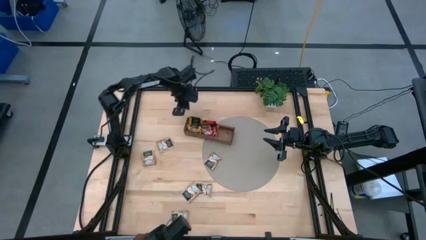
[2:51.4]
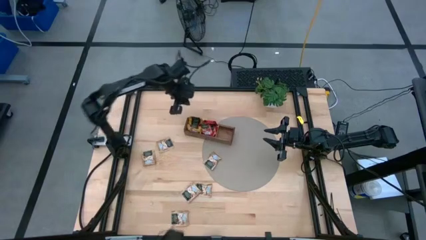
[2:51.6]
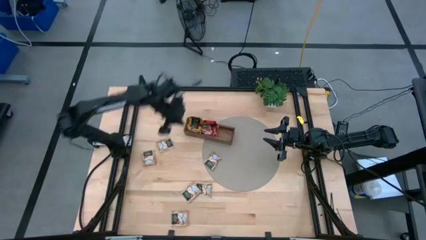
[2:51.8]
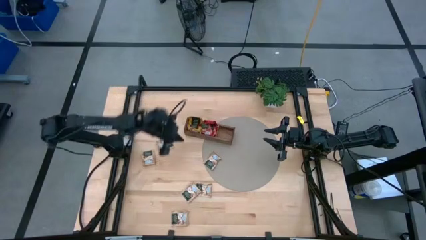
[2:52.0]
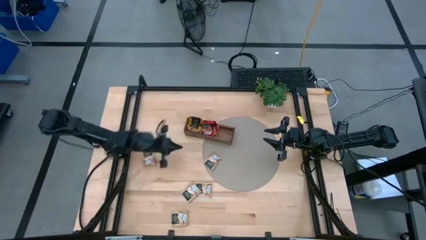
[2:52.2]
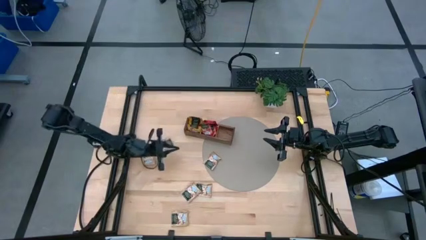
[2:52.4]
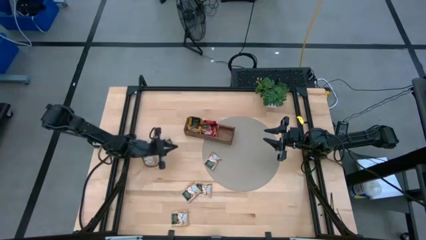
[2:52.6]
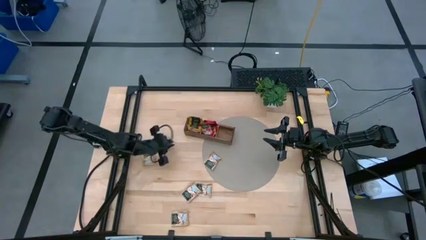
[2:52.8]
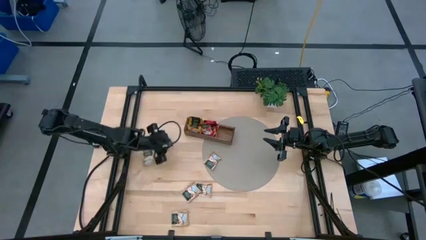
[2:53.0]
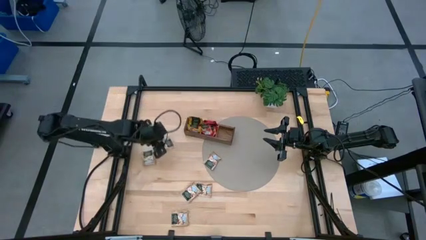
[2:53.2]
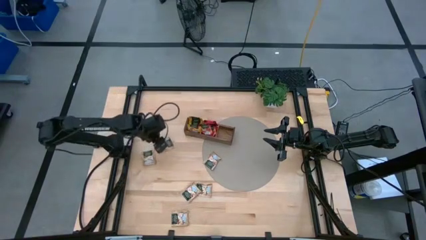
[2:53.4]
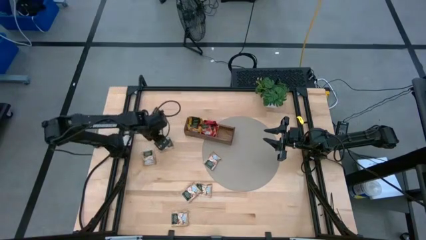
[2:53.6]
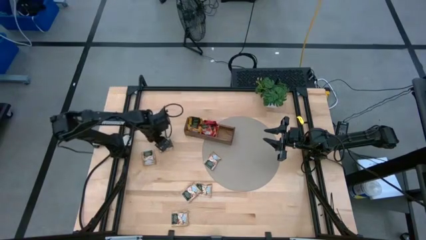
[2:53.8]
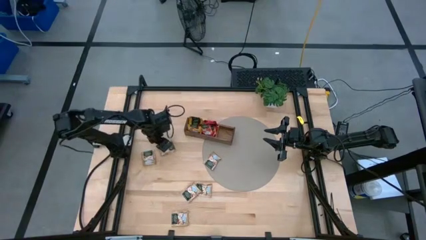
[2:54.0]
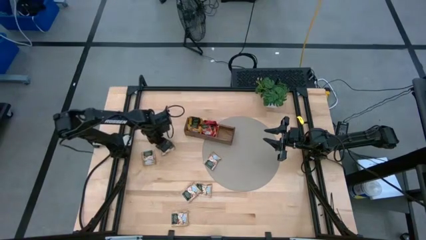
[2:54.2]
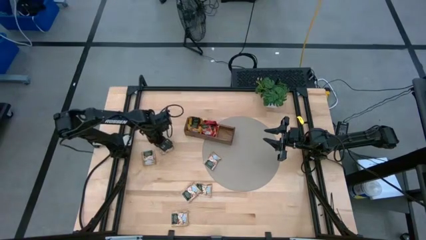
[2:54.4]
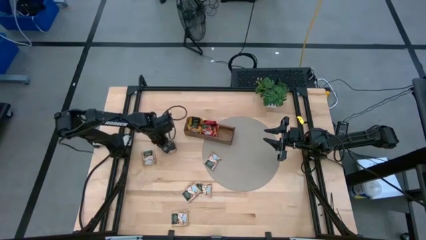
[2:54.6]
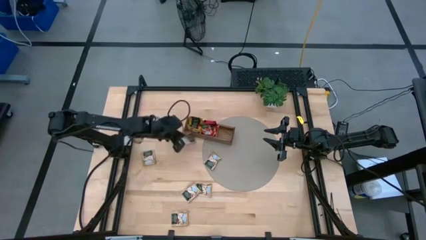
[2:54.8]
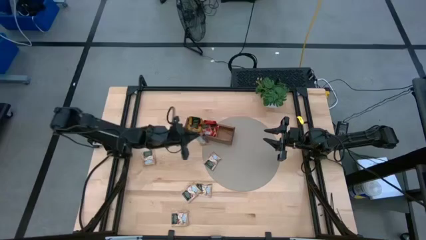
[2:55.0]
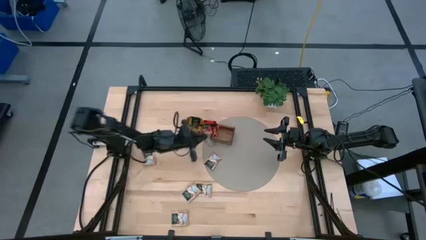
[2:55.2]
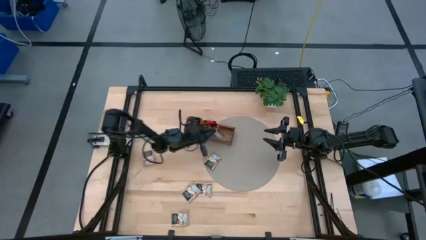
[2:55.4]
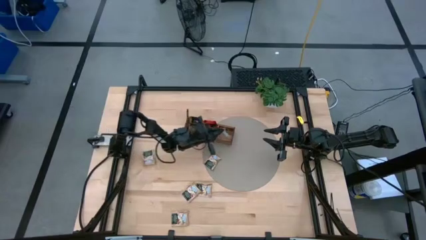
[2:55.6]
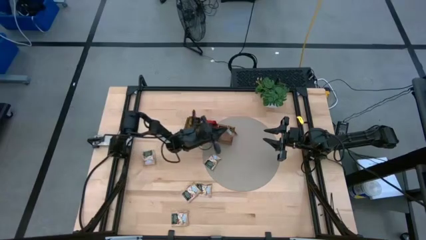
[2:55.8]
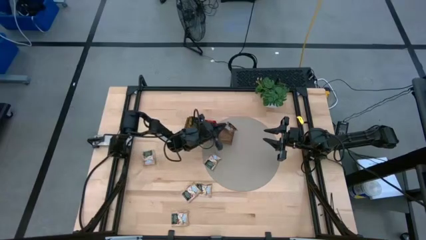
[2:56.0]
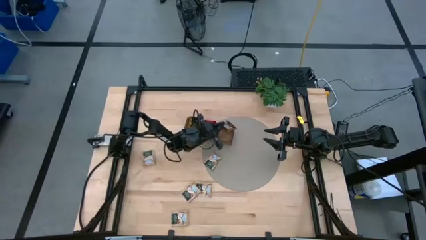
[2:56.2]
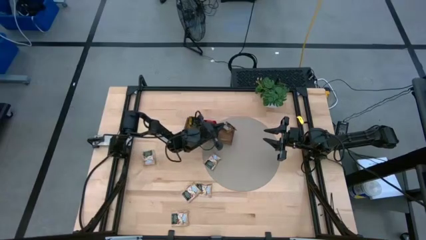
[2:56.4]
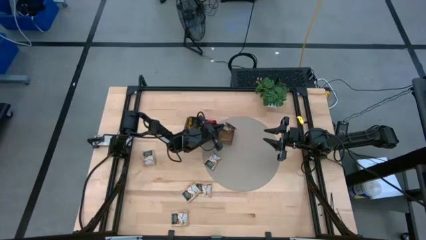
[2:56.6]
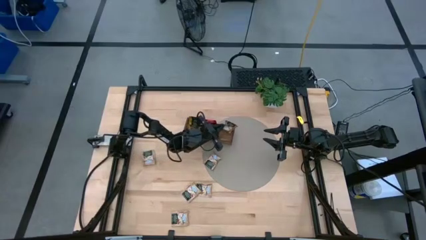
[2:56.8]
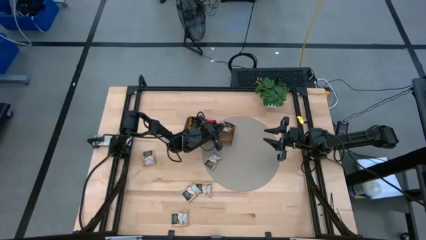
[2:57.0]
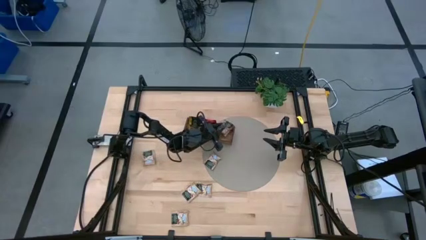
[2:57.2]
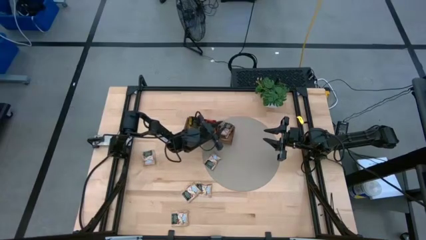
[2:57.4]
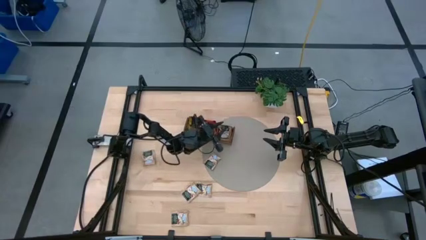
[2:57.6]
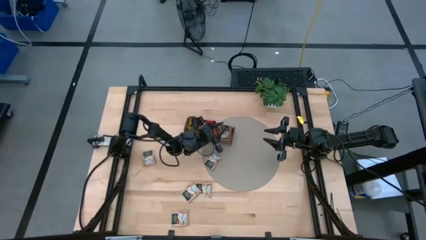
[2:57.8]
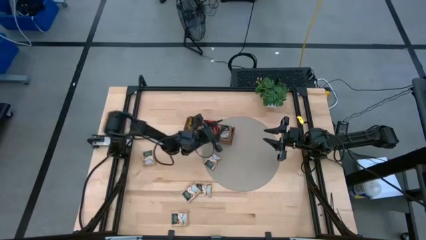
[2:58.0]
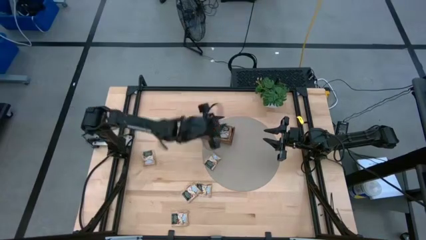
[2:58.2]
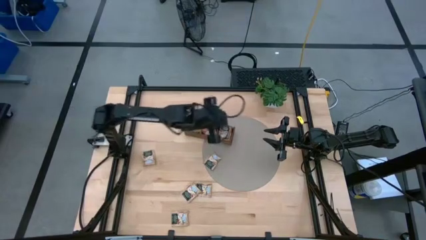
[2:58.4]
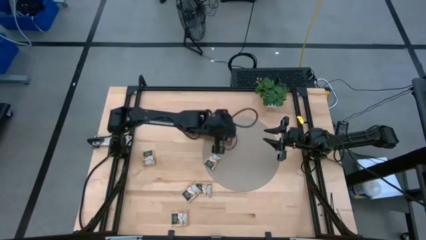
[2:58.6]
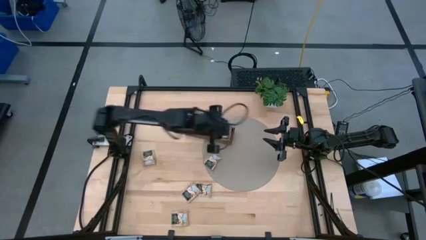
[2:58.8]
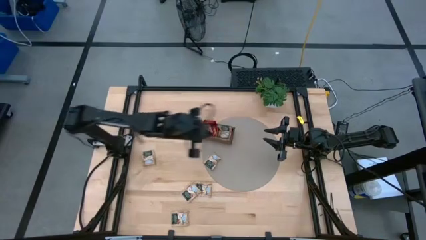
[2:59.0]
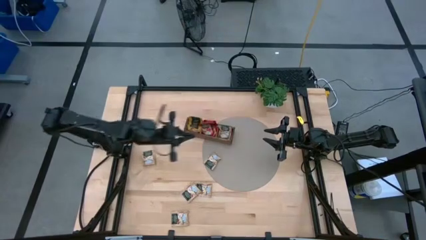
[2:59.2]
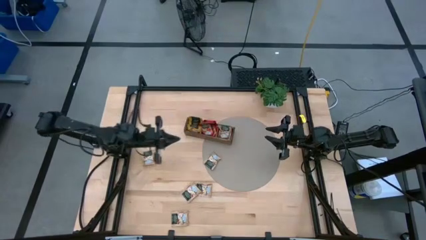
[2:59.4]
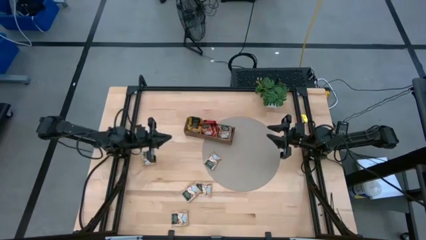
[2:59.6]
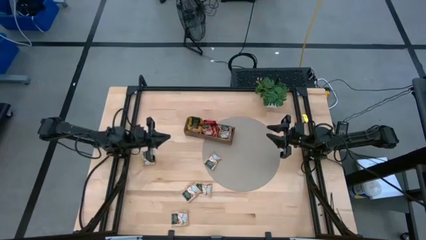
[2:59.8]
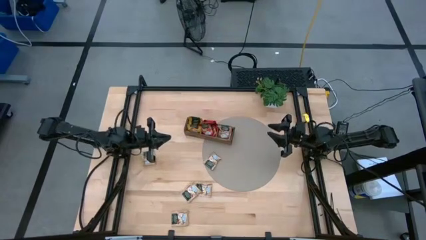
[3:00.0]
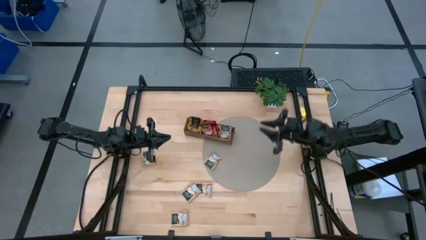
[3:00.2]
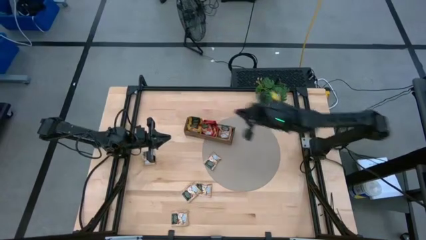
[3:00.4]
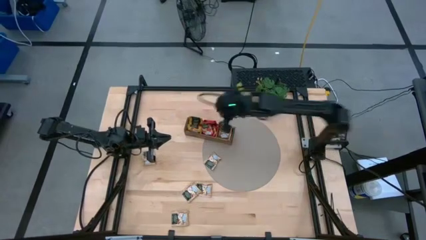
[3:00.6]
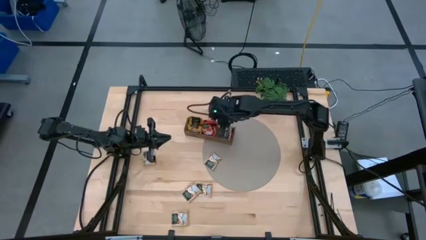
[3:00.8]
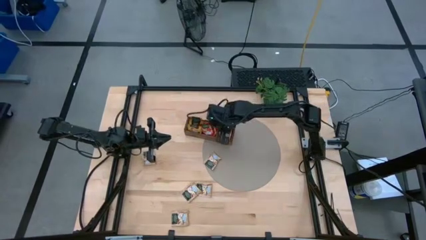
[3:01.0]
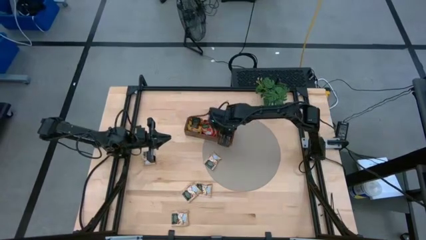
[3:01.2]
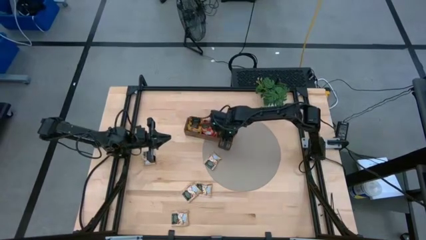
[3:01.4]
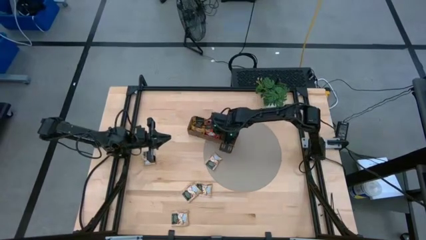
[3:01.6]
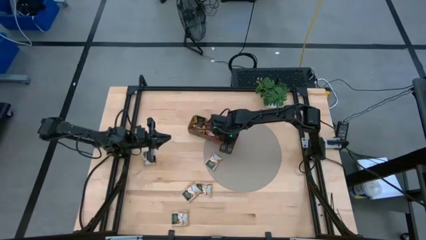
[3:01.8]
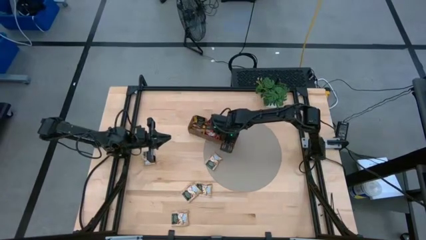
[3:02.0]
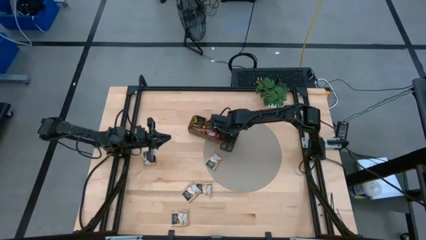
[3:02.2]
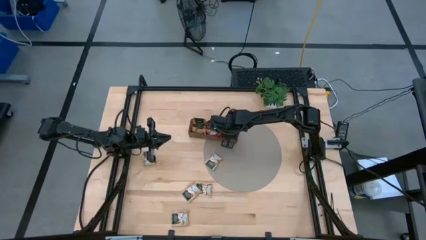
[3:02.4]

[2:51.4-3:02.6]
Task: Pick & Place Tea
Put the brown tea bag into the right section of the wooden organizer

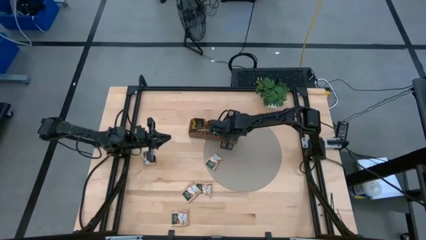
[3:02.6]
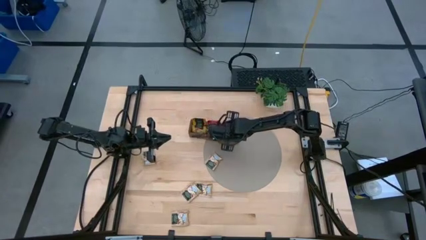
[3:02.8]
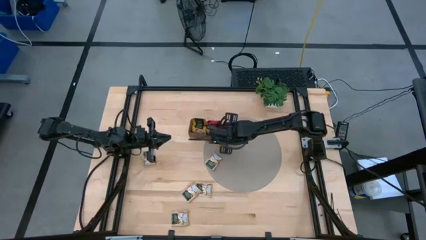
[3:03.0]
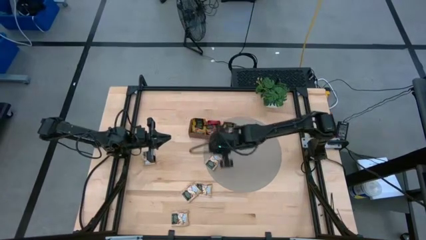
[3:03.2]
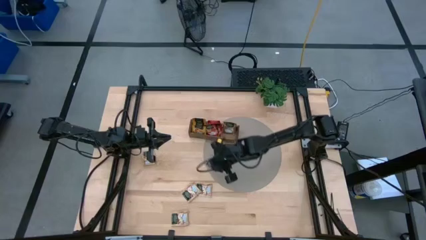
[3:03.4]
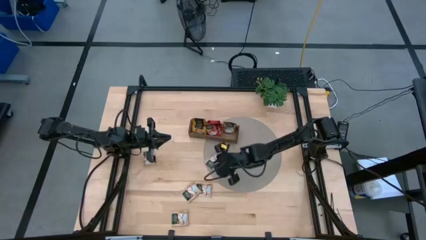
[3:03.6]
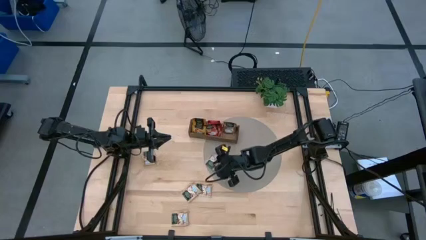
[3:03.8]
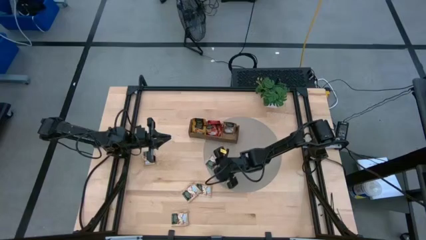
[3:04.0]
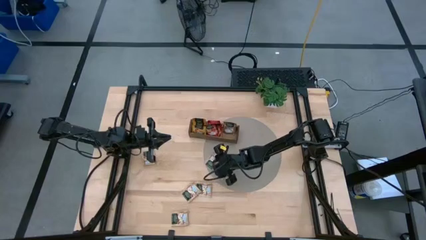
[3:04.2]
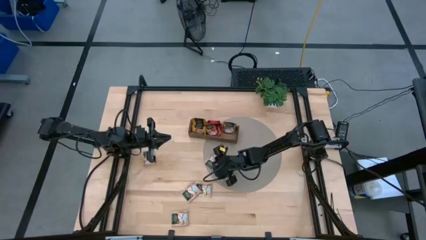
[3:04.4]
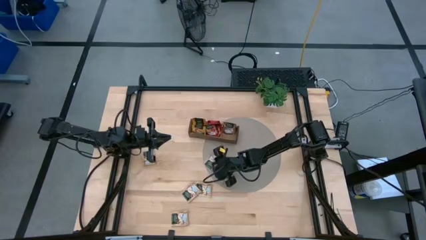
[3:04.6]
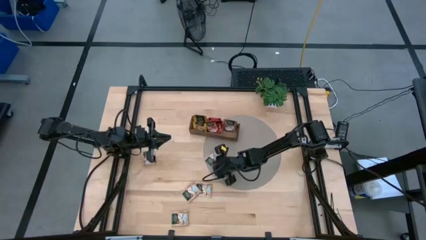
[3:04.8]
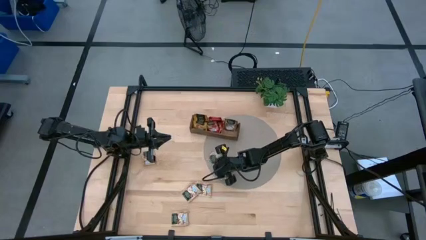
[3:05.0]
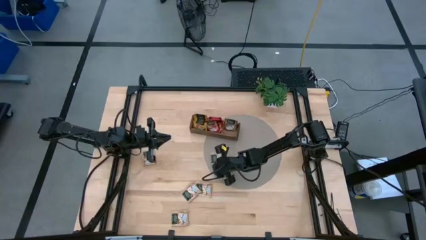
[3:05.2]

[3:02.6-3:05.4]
Put the brown tea bag into the right section of the wooden organizer
